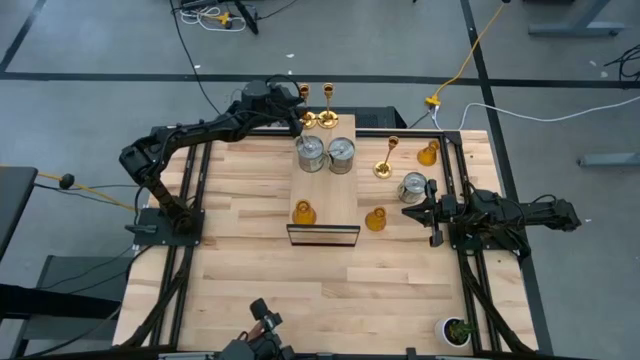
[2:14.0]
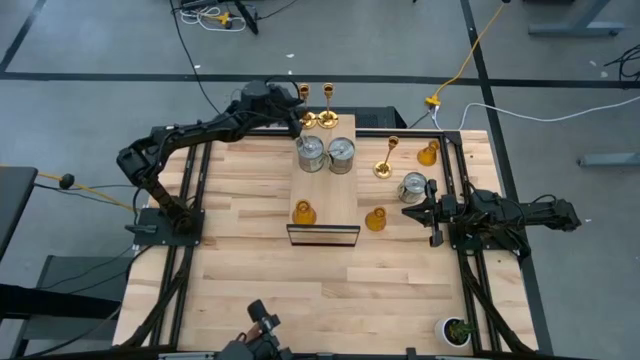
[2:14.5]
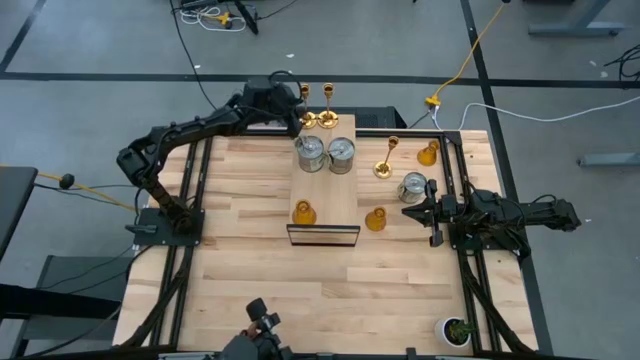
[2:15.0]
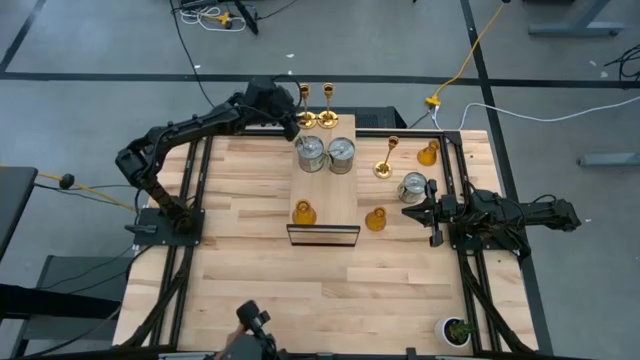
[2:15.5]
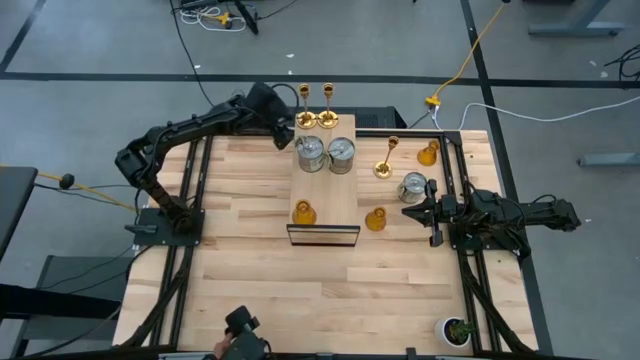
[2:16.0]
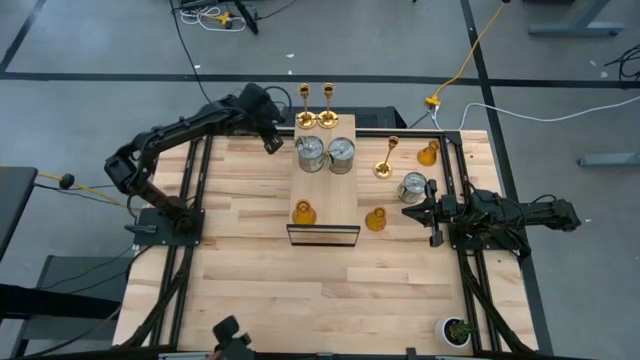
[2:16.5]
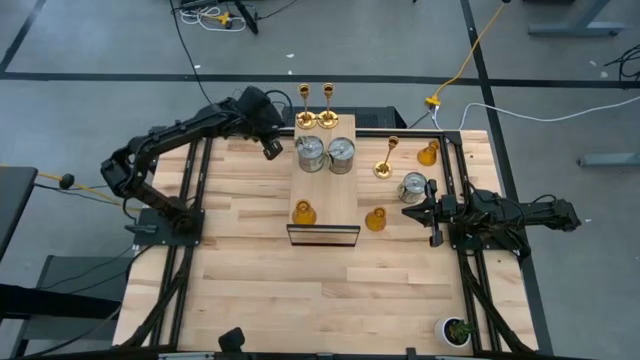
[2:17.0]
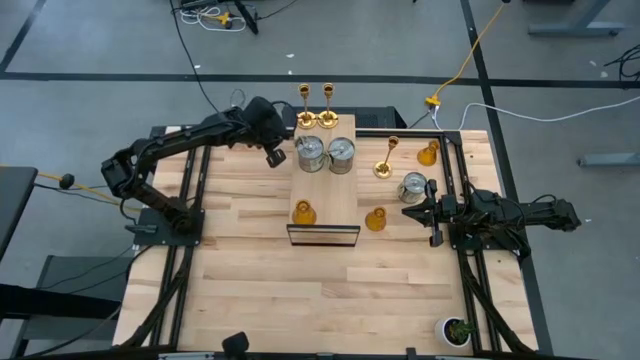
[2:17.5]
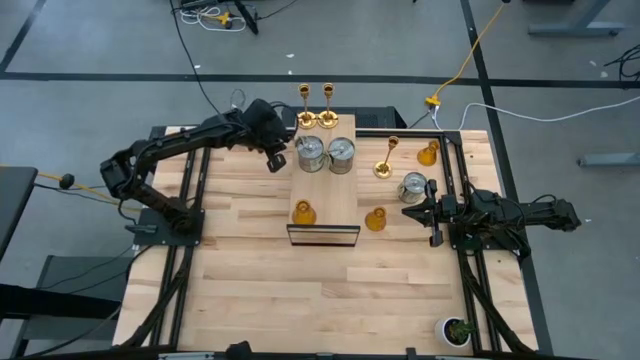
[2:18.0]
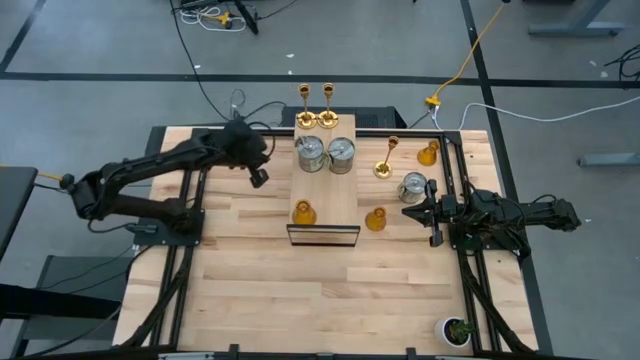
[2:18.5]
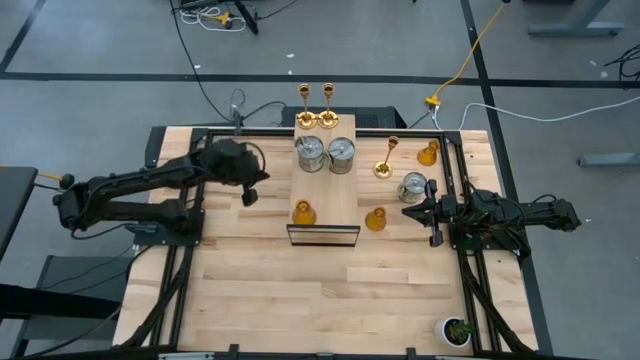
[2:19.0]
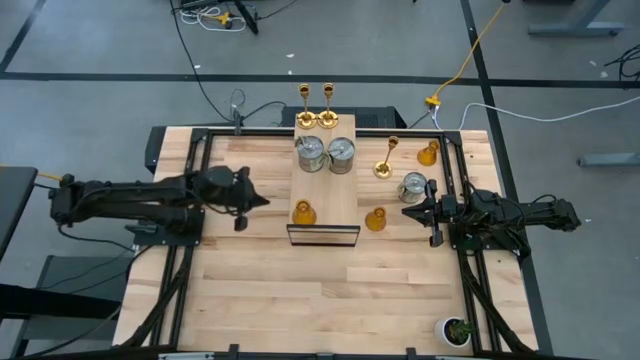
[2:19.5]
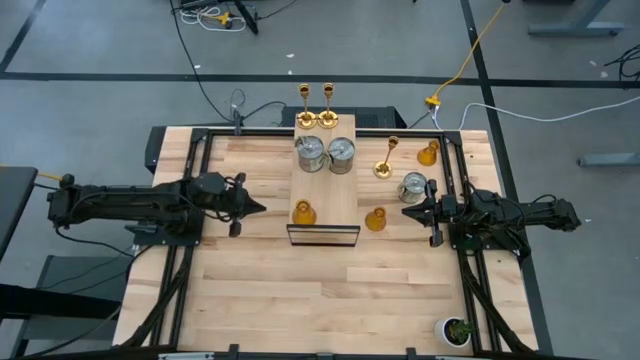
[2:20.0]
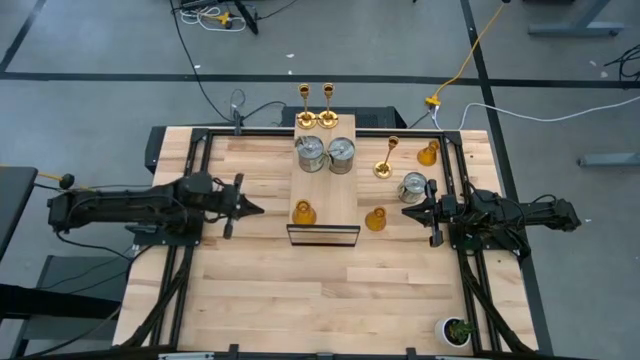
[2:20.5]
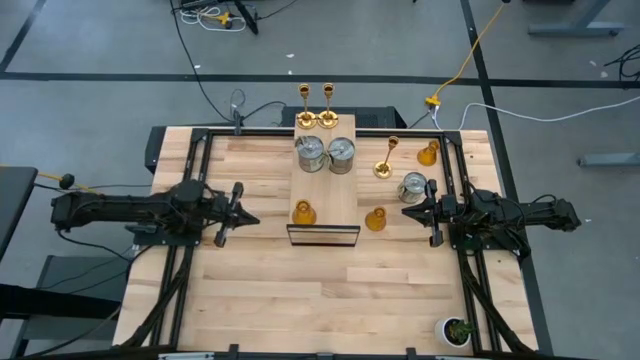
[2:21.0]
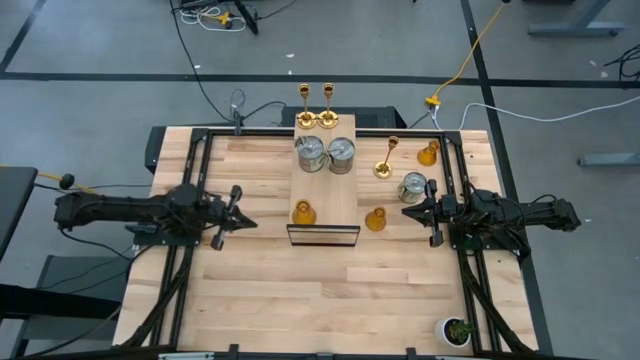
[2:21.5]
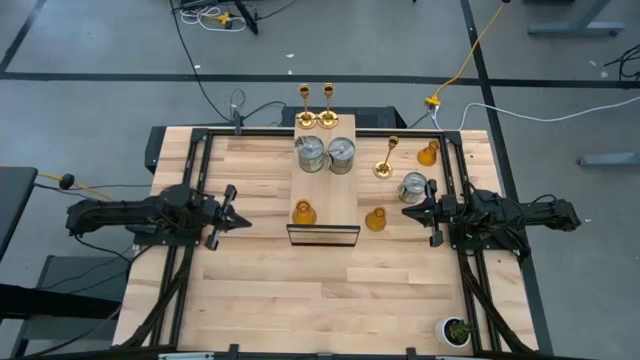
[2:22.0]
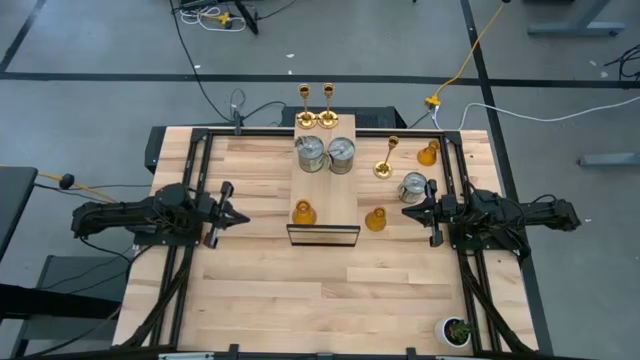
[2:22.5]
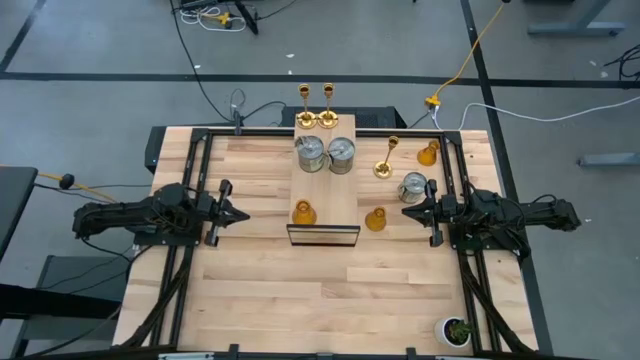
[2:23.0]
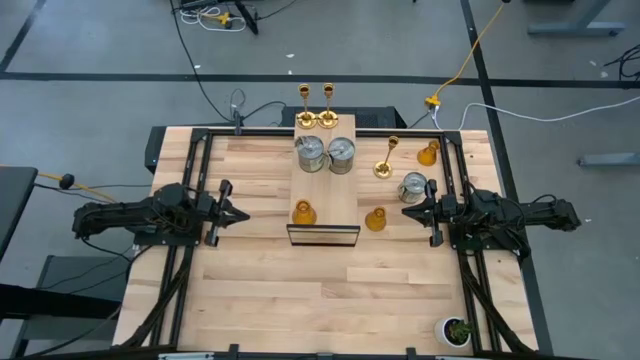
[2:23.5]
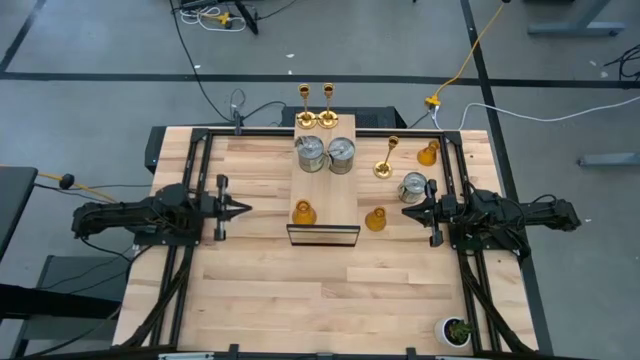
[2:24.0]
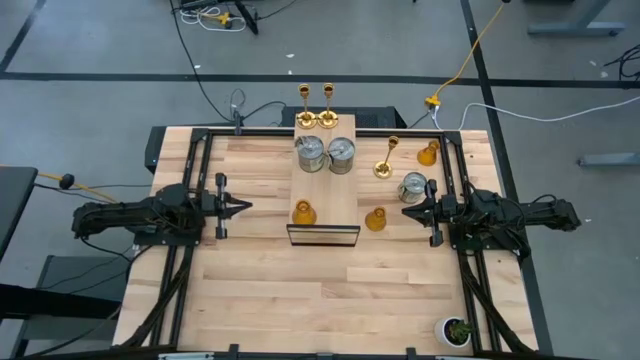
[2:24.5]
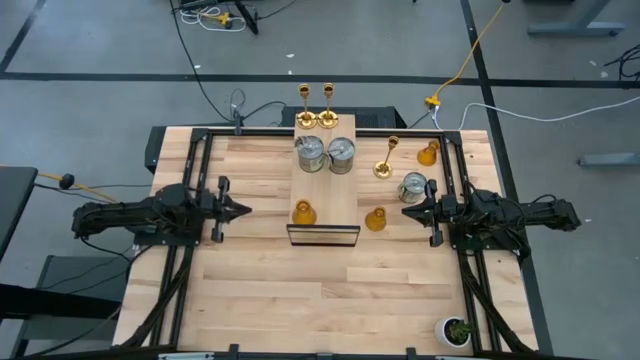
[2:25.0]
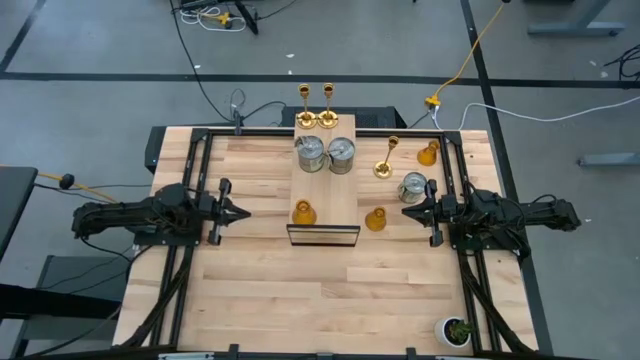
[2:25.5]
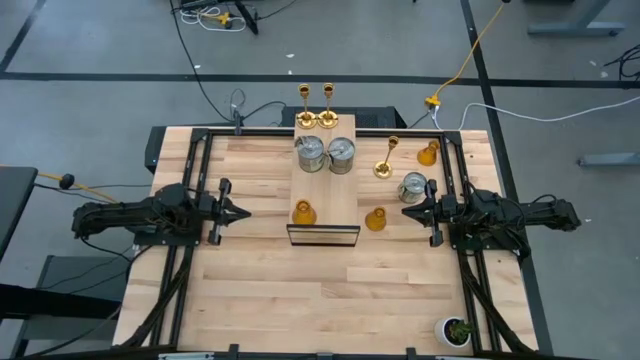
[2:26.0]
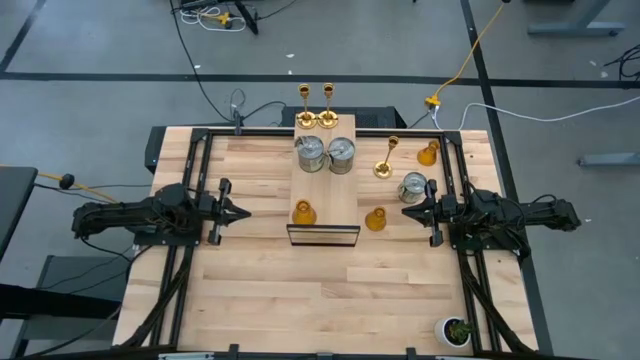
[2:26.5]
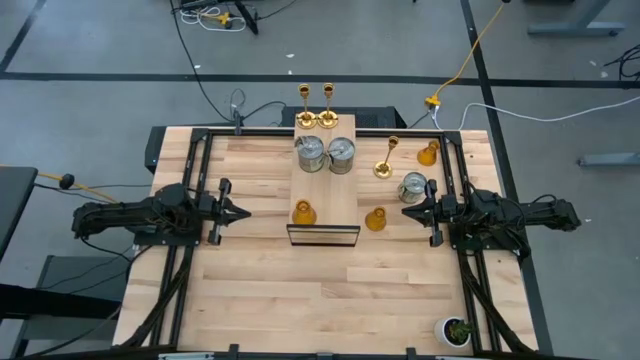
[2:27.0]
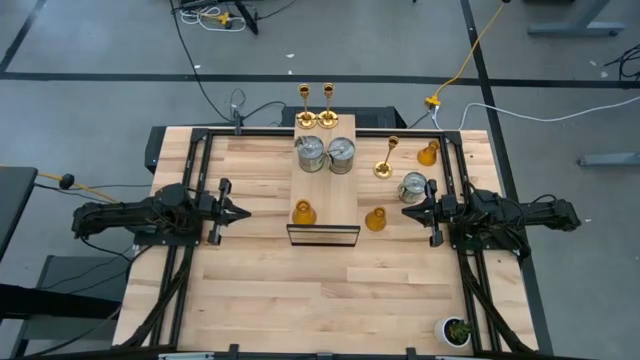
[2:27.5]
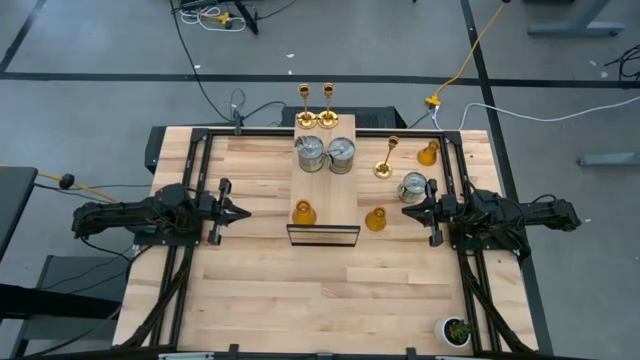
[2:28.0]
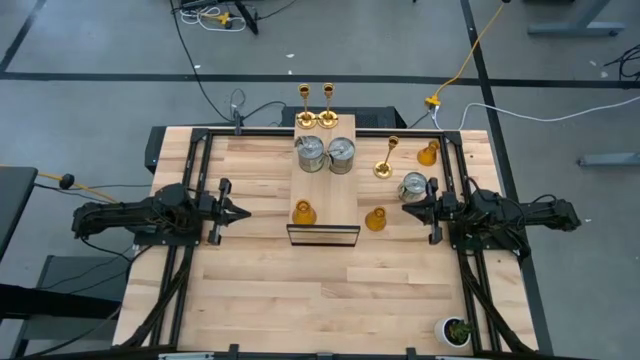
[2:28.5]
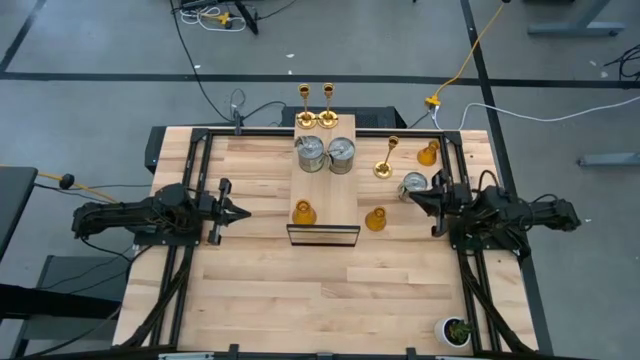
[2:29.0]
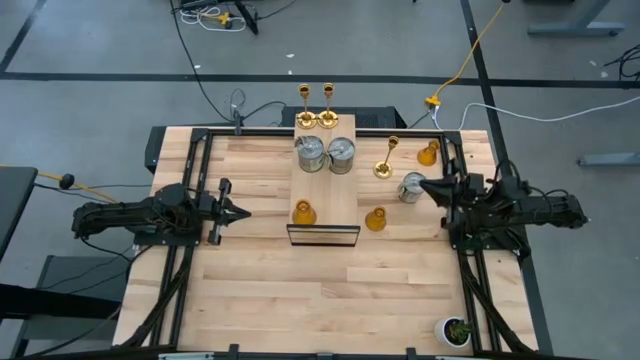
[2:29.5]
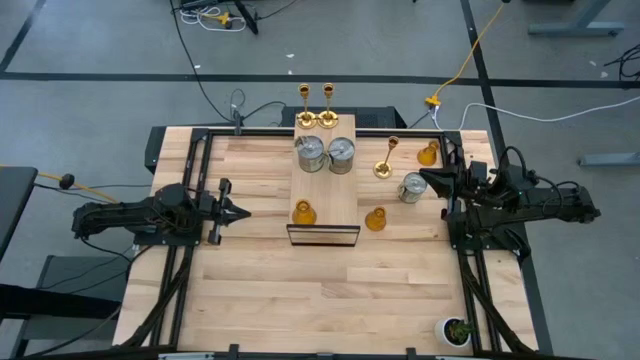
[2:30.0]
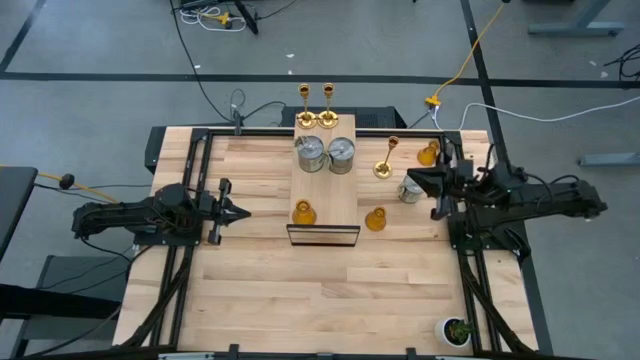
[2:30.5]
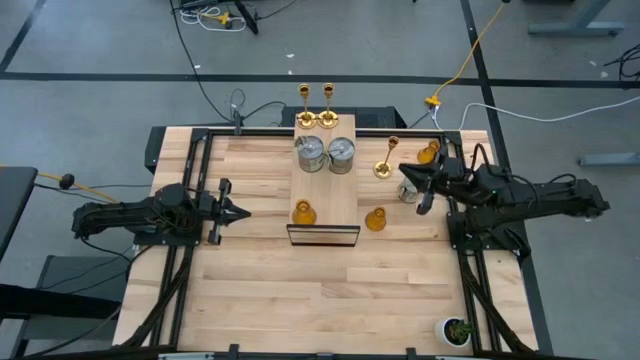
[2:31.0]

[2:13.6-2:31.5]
Task: Pick & Place candle stick holders
Put the gold candle holder aligned with the other candle holder on the shelf

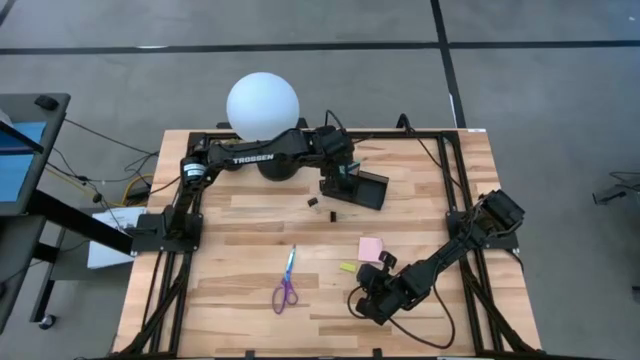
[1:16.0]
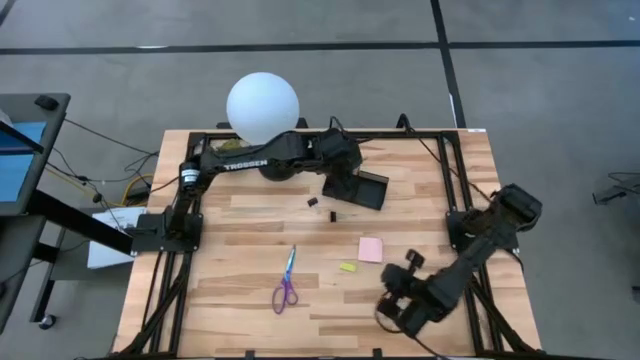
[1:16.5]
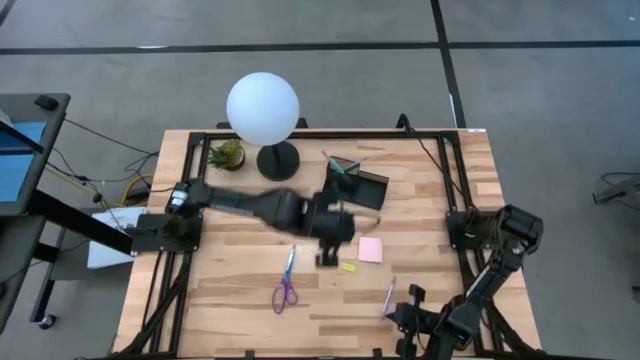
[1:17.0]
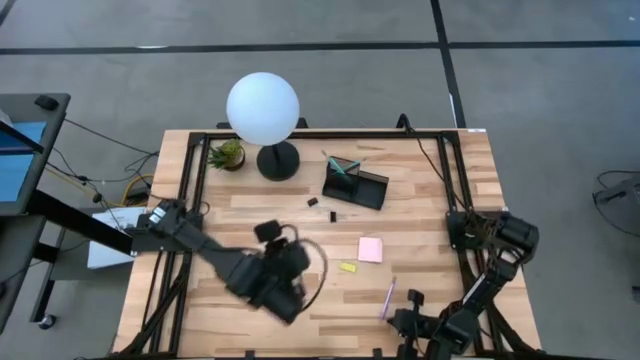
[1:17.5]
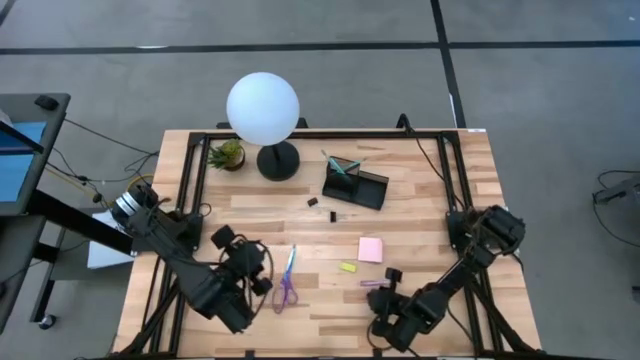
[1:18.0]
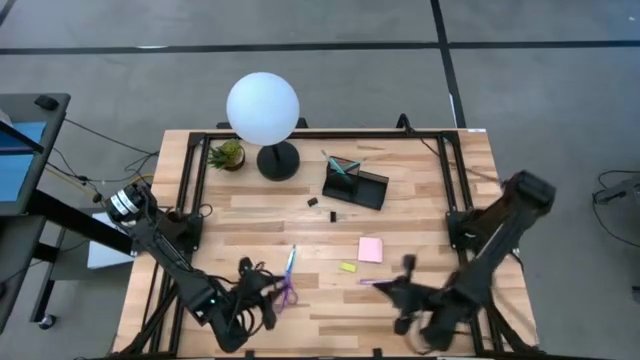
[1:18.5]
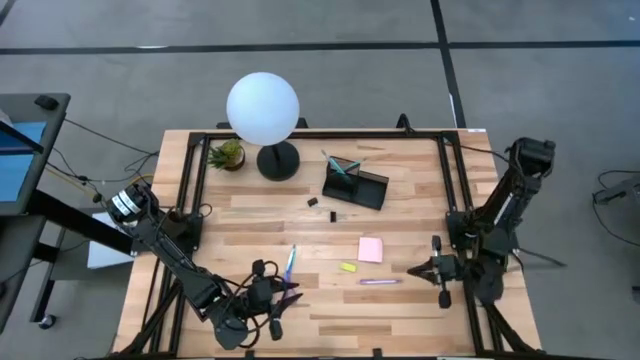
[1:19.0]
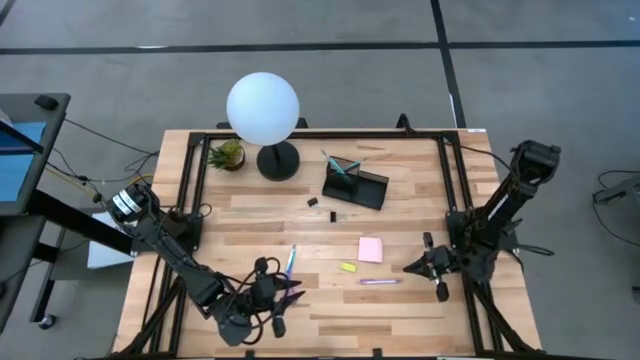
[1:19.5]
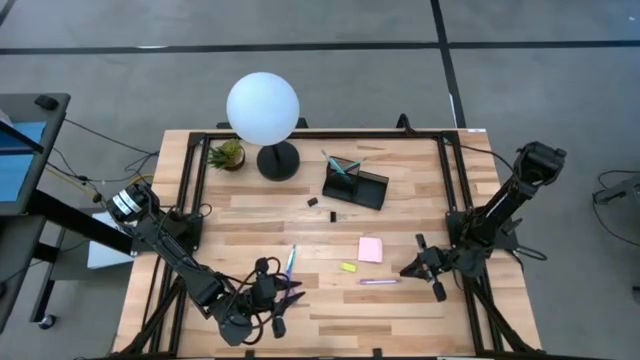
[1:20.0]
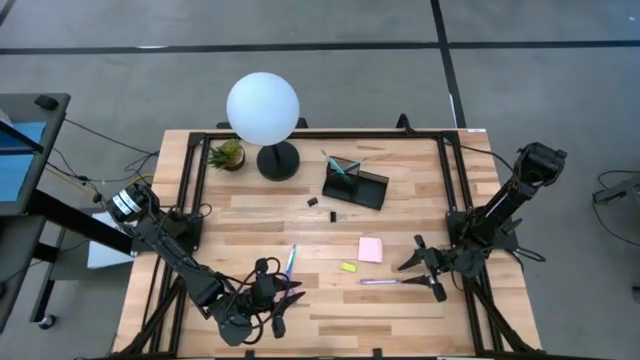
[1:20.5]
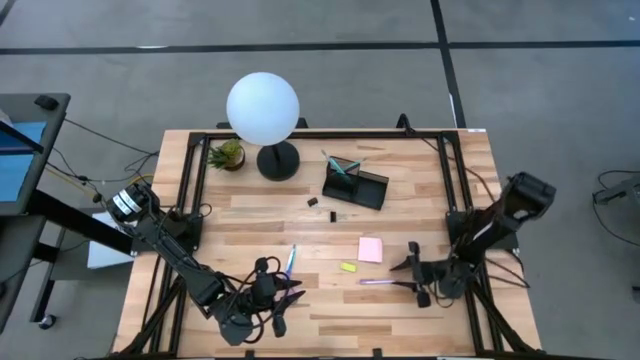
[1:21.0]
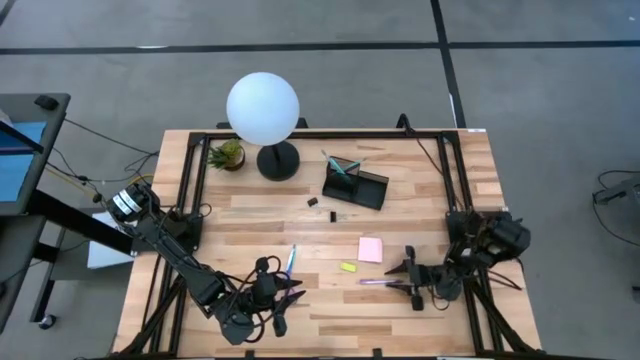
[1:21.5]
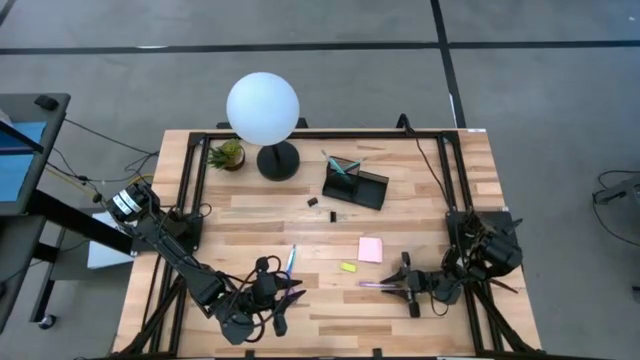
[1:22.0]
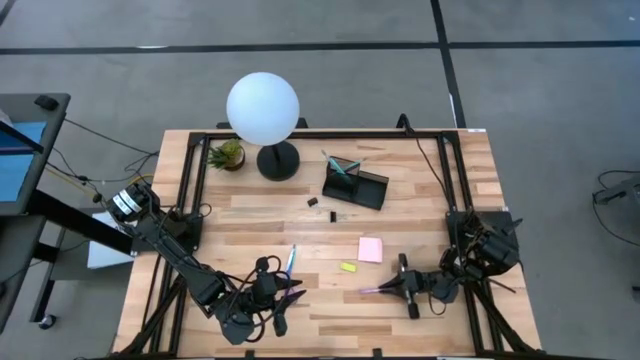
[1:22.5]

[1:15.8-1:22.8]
Task: Pick and place office supplies into organizer
Put the purple pen into the black desk organizer
